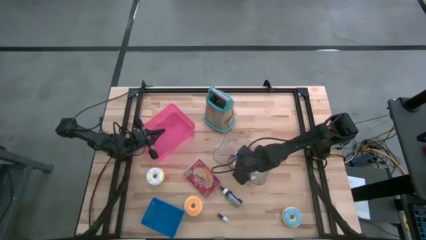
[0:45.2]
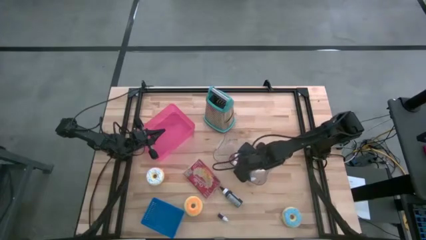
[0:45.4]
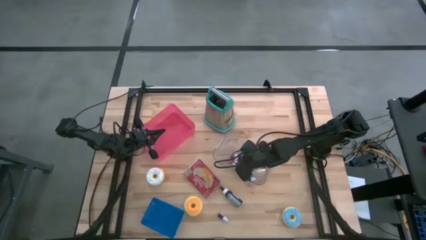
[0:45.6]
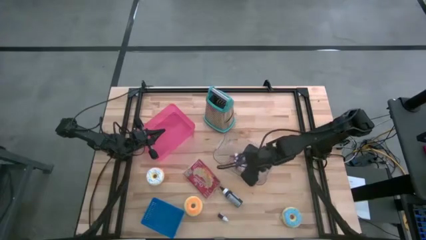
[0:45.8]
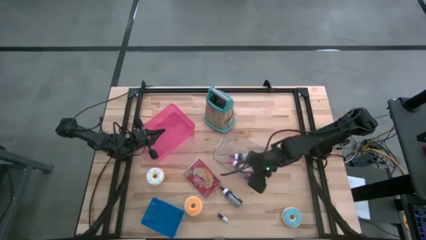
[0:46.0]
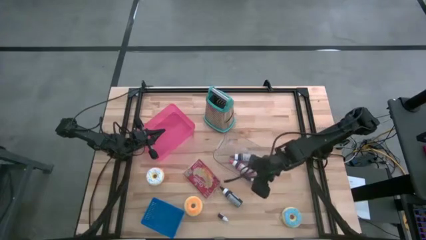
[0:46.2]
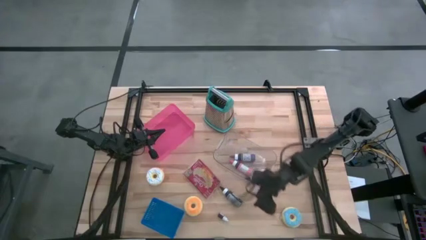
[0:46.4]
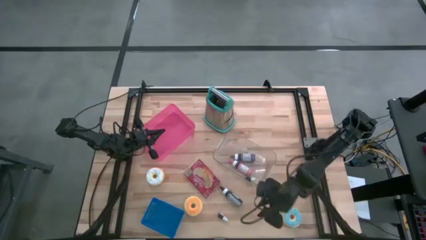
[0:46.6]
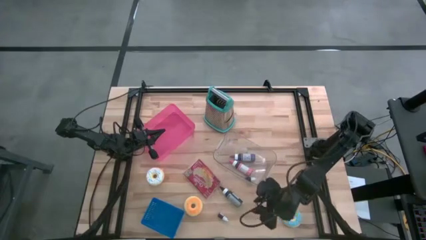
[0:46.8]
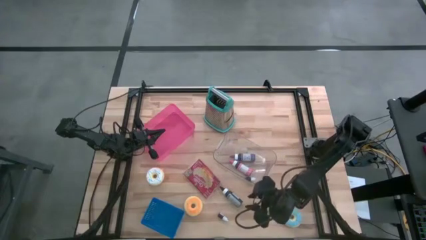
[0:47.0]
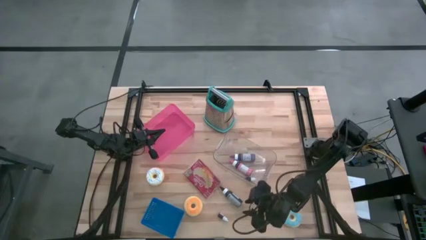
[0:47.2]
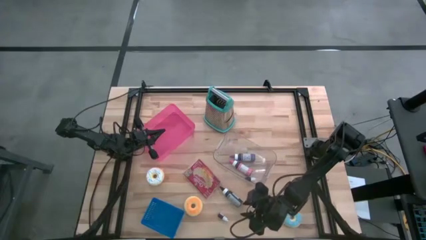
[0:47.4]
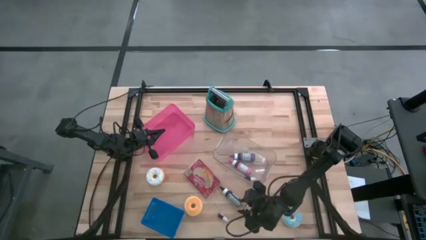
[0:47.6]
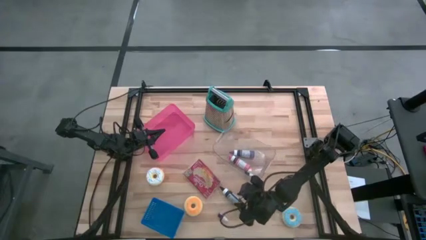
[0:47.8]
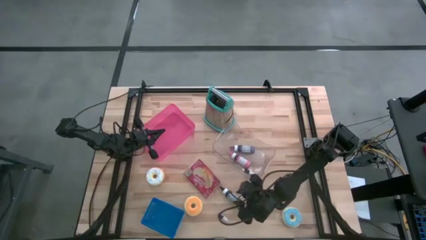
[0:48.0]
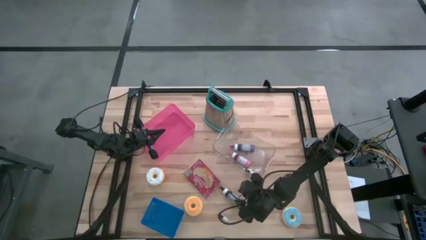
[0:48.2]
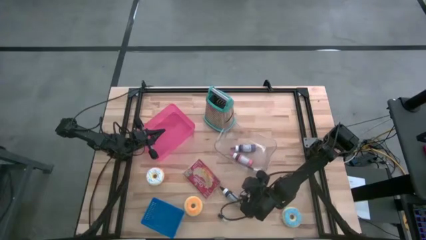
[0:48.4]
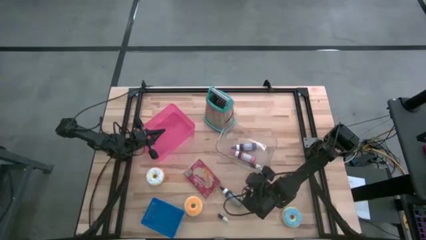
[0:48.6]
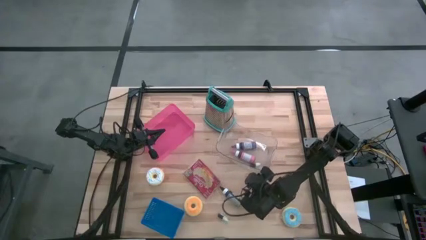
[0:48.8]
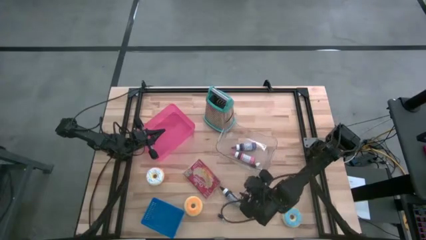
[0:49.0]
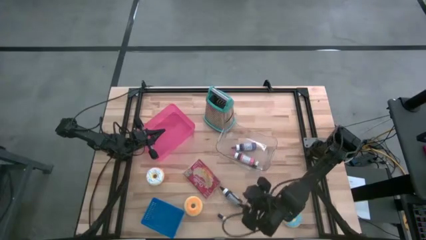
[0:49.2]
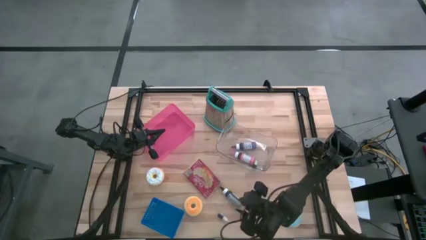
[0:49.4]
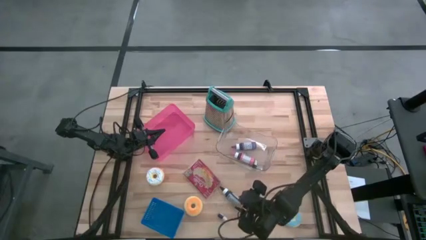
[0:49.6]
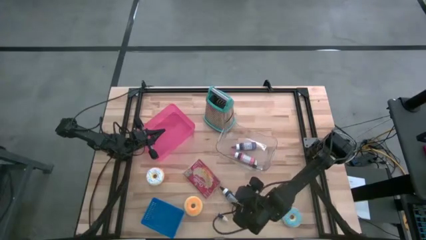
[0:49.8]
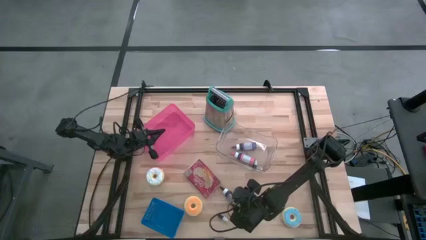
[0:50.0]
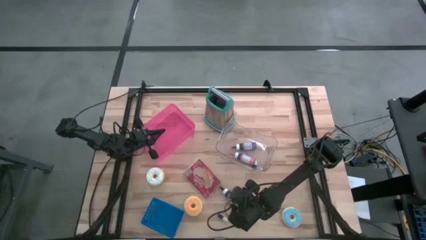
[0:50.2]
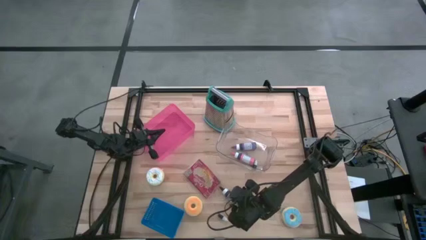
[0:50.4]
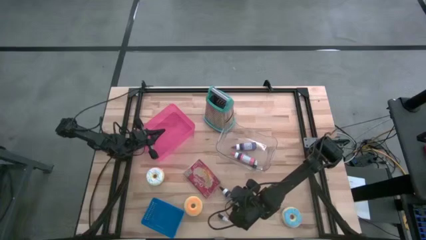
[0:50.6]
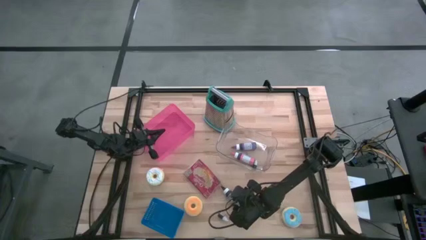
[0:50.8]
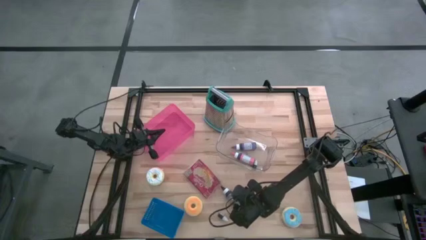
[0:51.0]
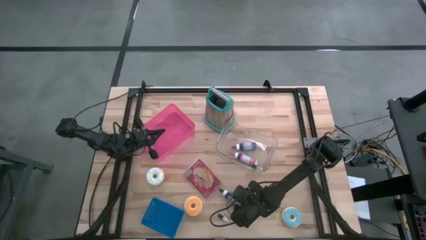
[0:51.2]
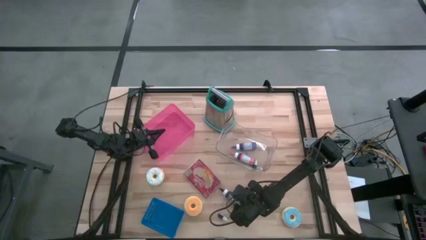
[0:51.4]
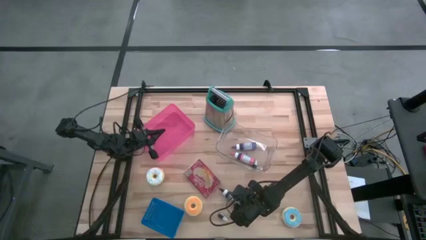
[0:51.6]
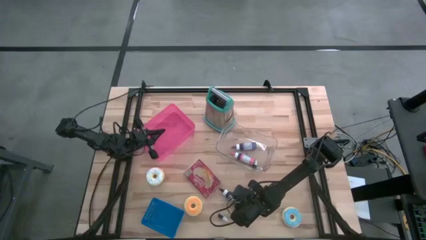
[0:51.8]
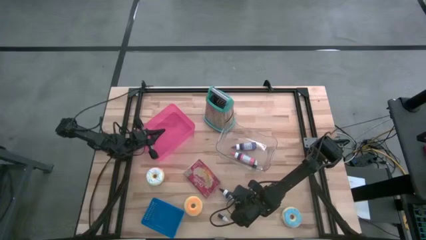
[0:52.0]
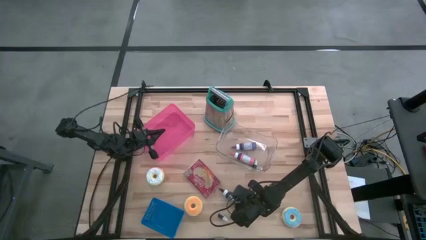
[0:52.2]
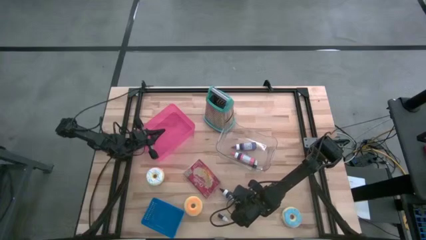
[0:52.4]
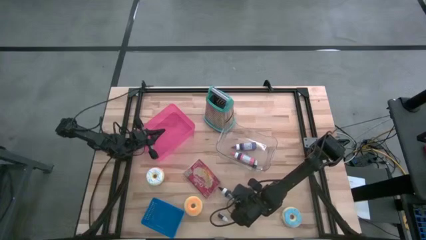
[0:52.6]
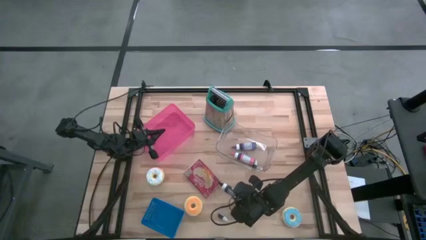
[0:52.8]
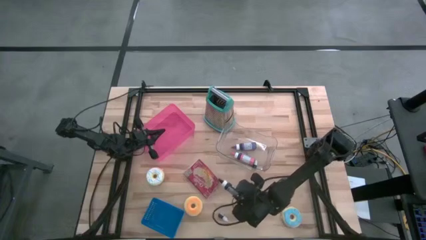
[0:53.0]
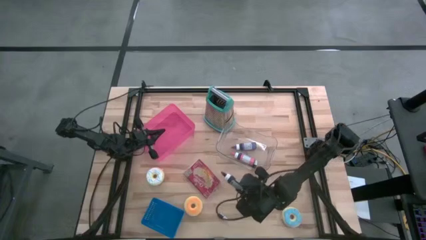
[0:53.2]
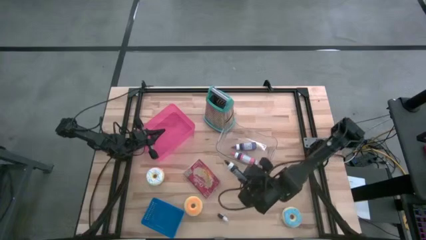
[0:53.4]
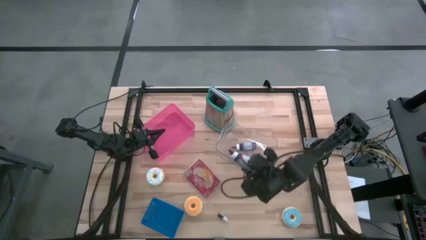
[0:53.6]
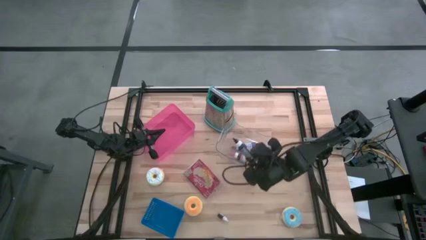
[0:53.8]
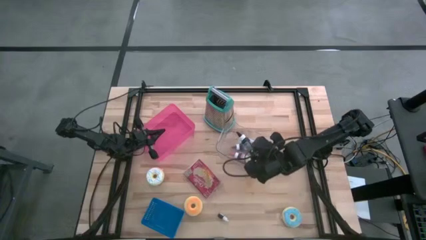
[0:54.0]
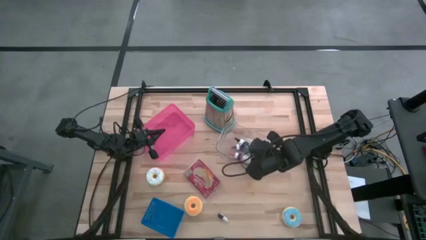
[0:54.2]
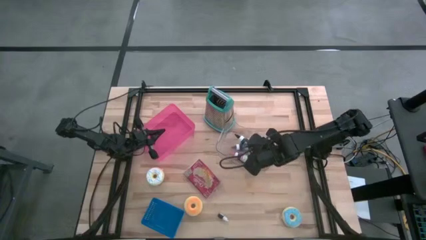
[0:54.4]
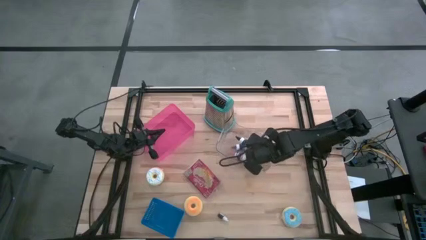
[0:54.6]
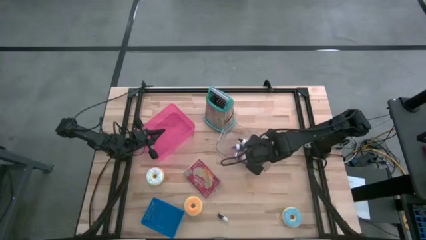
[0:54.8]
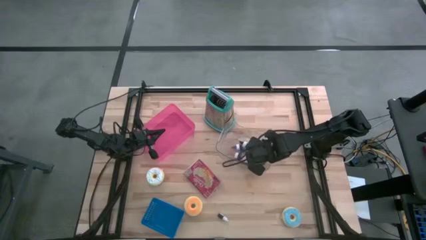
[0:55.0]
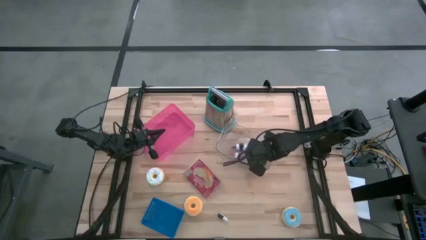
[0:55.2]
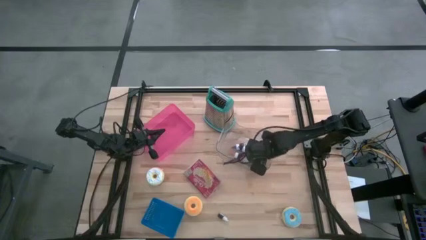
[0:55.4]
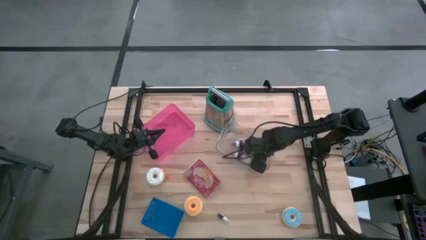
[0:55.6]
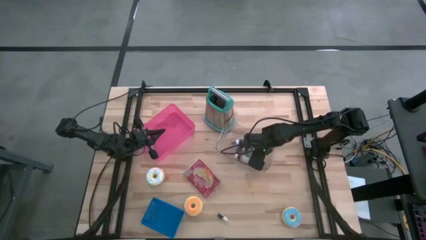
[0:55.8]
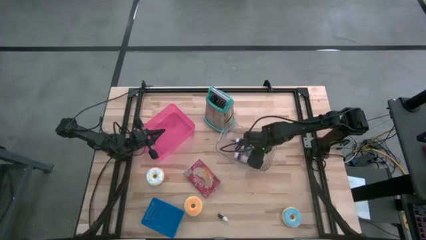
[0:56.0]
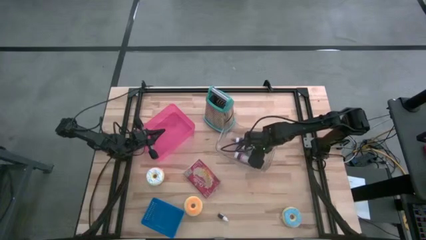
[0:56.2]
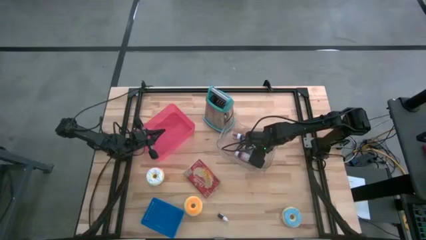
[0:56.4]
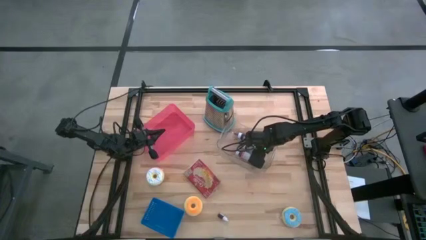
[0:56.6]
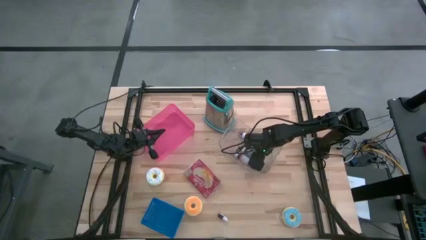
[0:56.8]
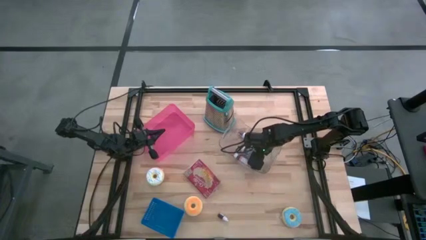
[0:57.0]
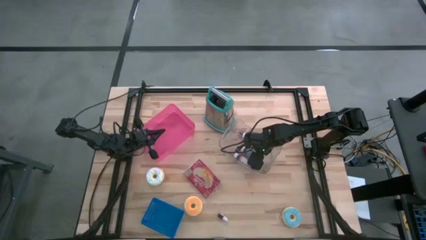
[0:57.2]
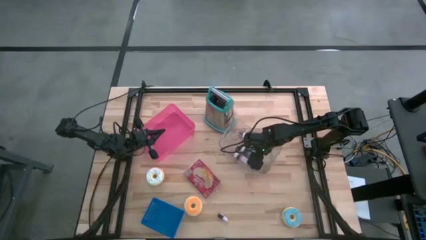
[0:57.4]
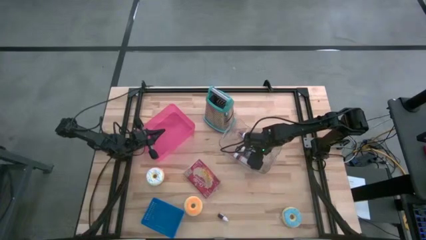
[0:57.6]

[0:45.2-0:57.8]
Task: Pick & Place Food Item
Put the large black food coloring bottle into the transparent bin

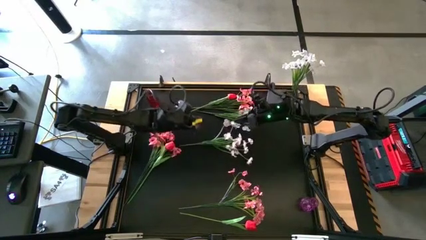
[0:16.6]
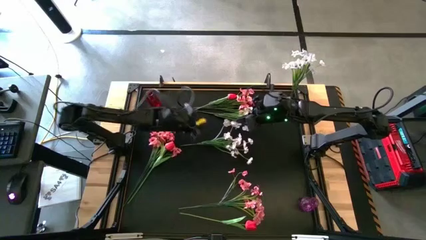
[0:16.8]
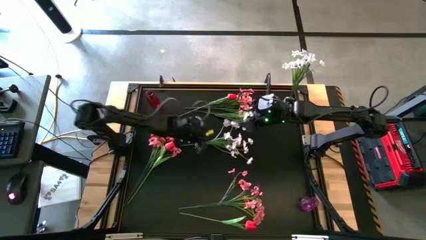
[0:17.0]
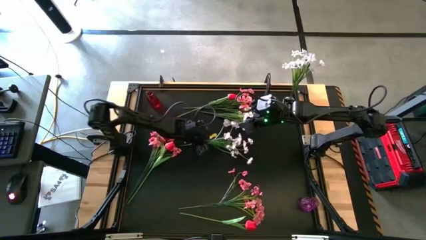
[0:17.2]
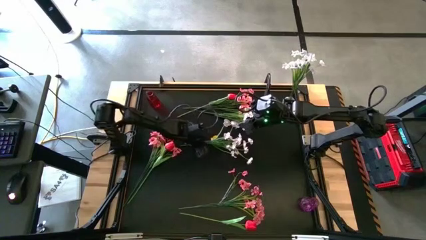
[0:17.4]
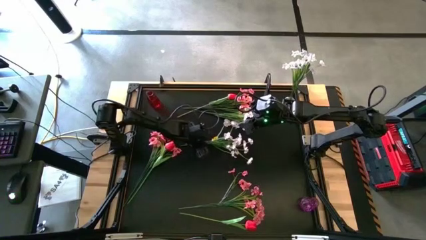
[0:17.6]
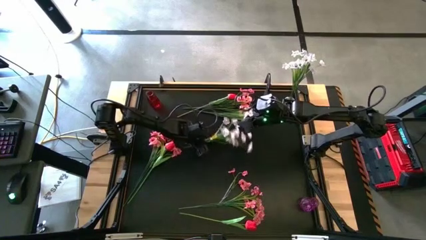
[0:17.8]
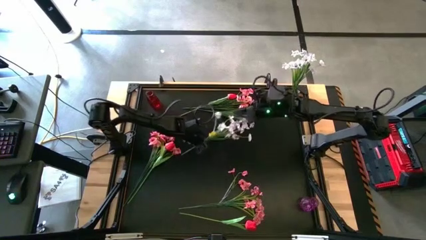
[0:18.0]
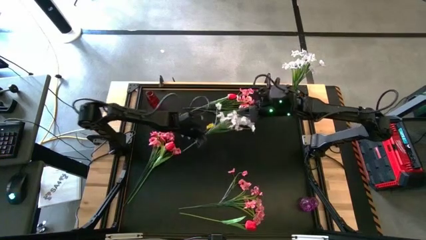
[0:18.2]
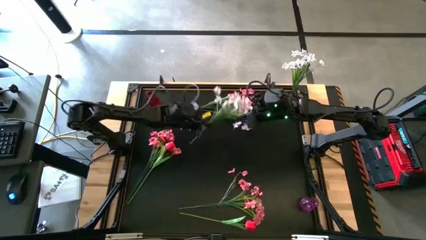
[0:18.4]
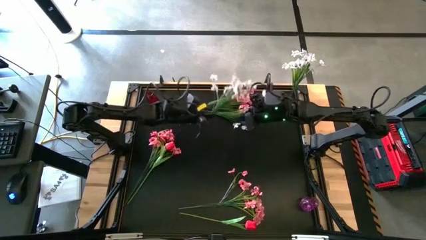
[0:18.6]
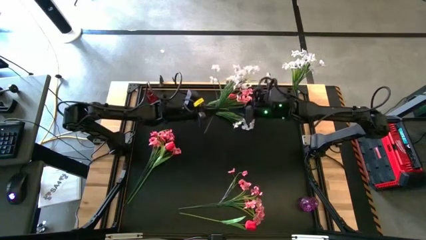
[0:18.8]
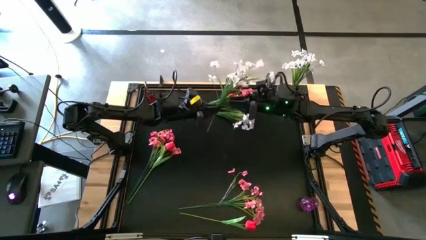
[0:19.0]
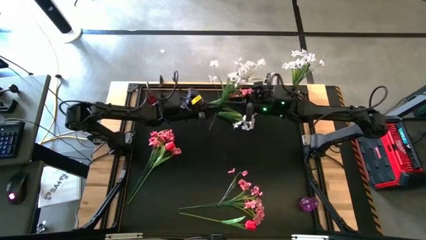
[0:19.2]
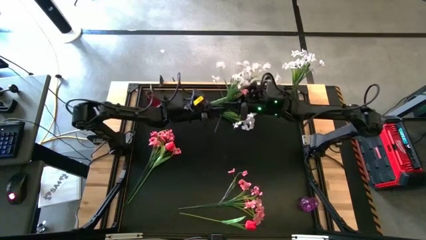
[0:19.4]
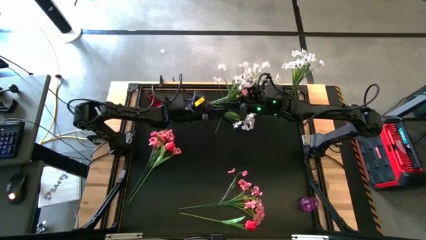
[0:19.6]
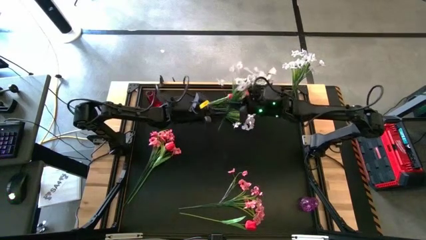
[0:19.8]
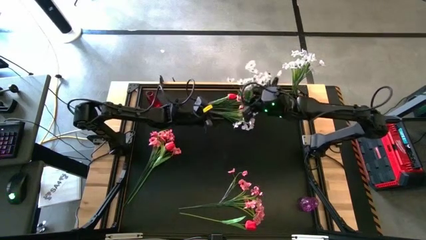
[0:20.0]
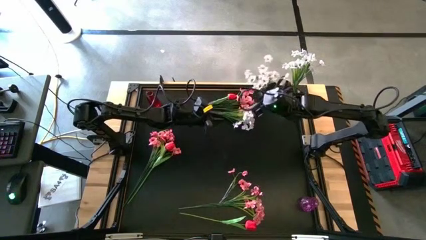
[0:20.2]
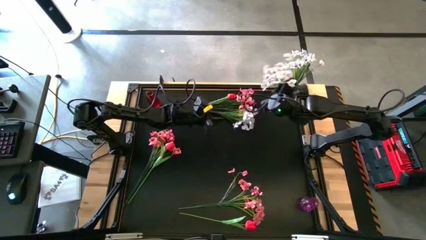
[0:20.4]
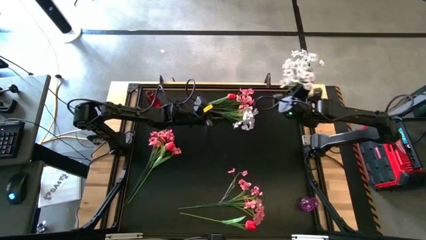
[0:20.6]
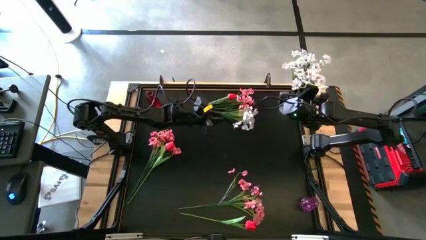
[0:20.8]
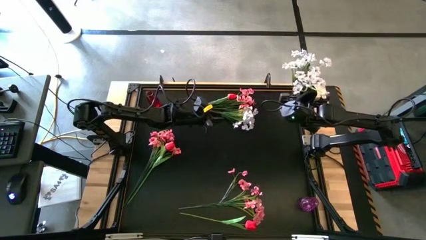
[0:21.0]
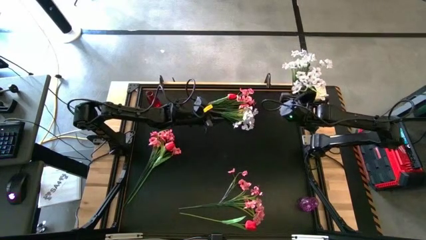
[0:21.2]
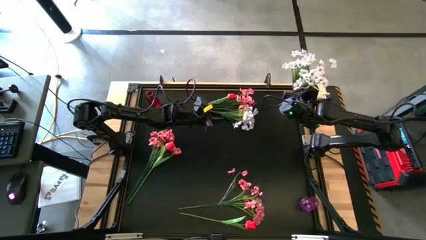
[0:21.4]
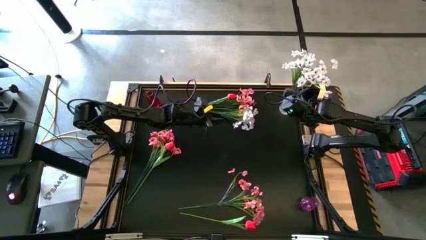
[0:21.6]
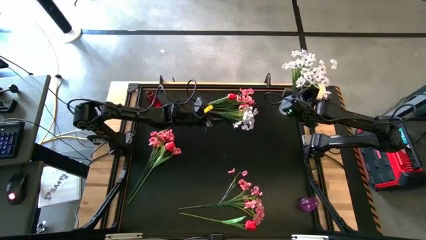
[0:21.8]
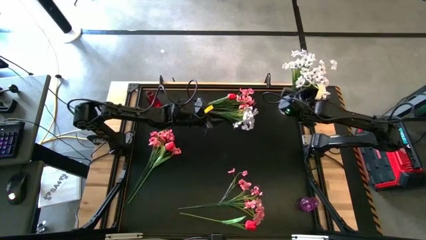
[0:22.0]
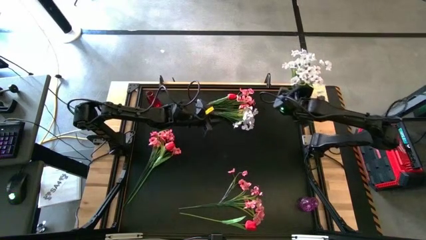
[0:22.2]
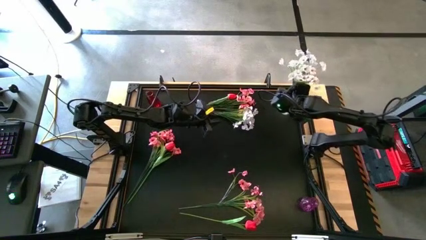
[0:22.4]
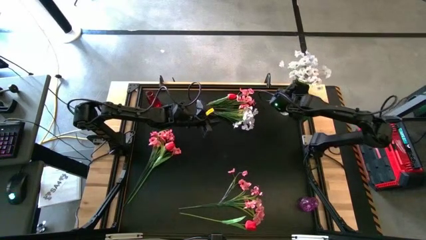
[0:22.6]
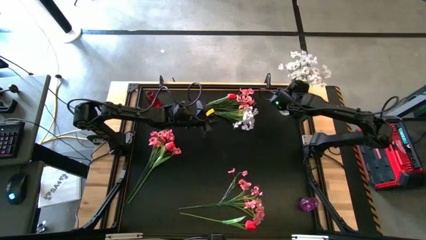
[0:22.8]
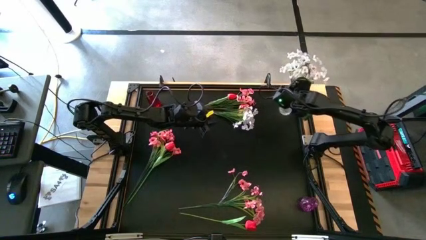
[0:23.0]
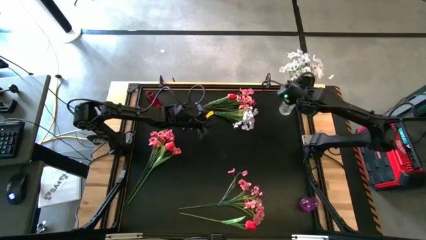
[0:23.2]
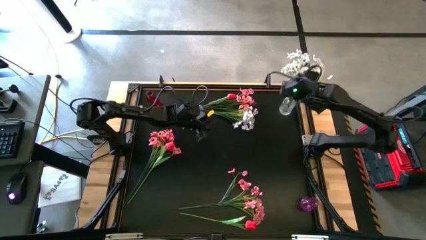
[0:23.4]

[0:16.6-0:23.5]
Task: Sort flowers into vase by color
Put the bottom white flowers into the transparent flower vase
